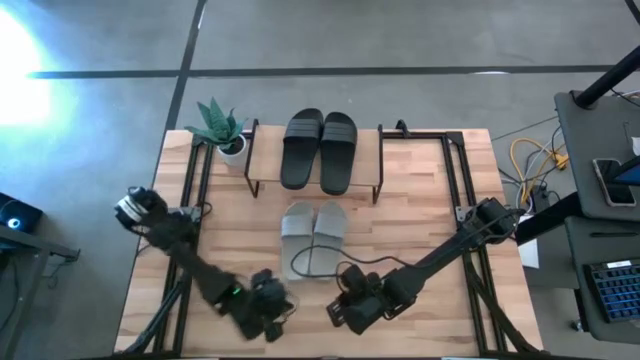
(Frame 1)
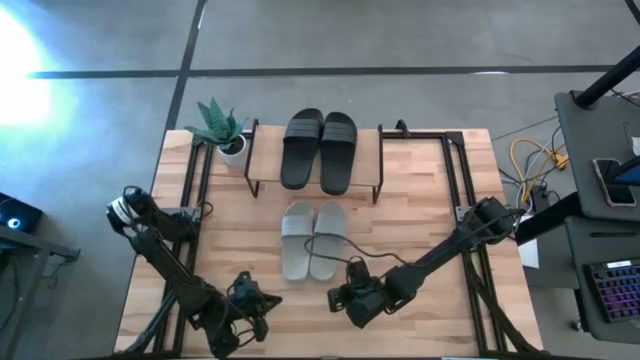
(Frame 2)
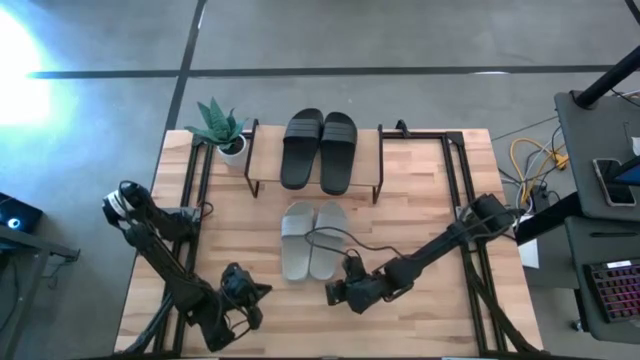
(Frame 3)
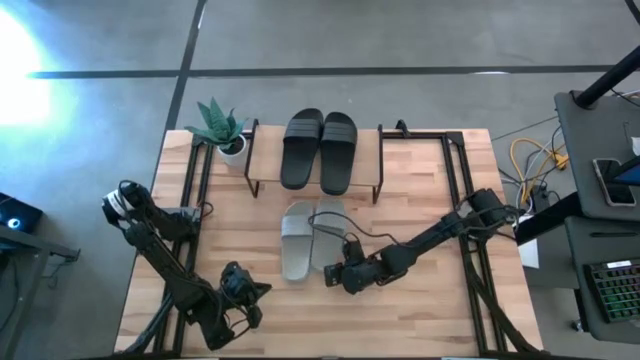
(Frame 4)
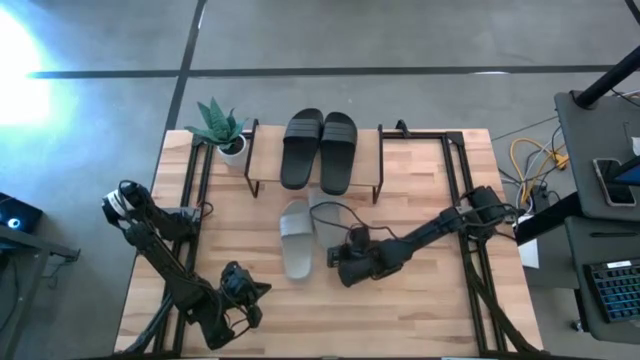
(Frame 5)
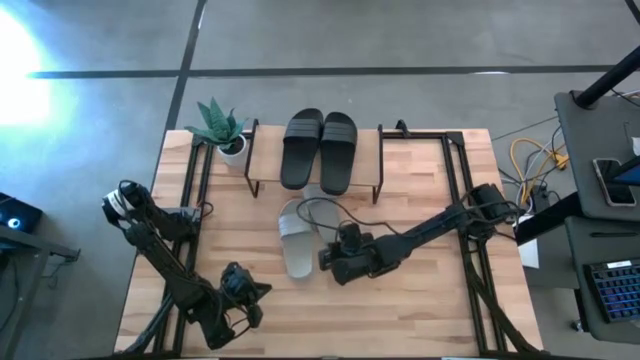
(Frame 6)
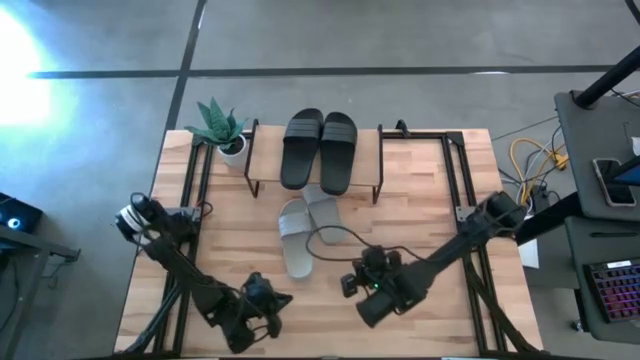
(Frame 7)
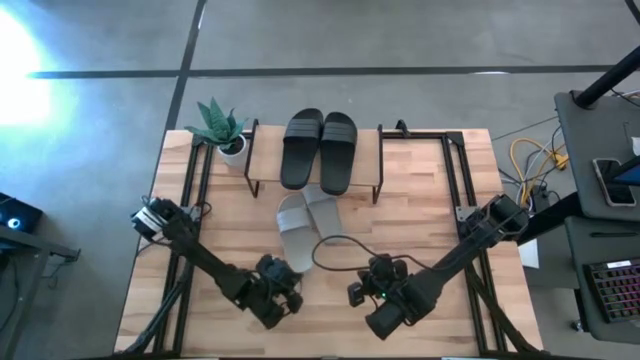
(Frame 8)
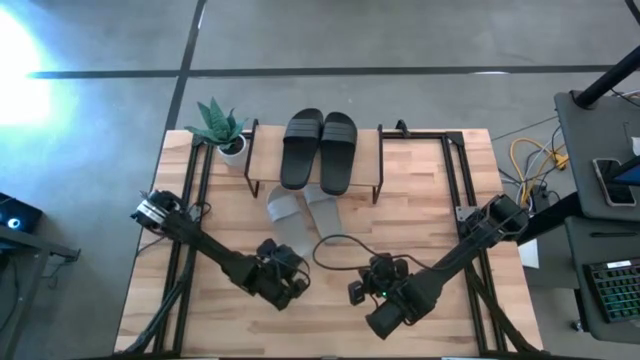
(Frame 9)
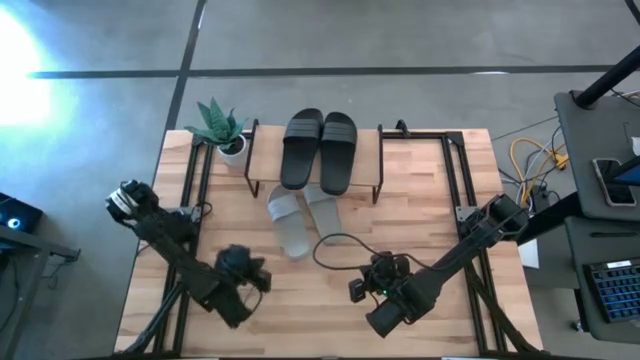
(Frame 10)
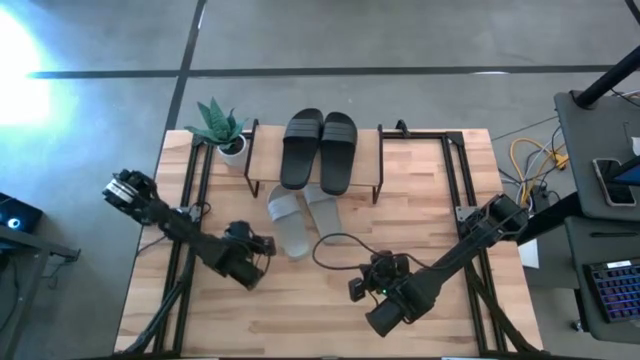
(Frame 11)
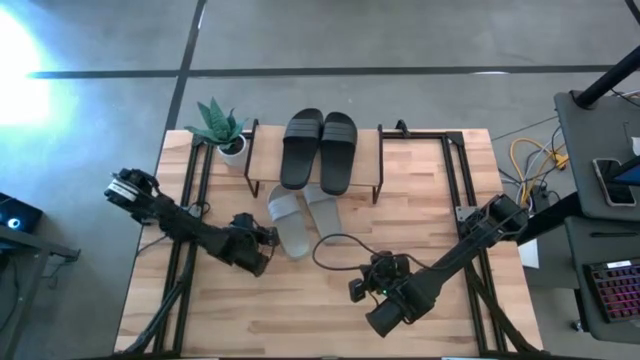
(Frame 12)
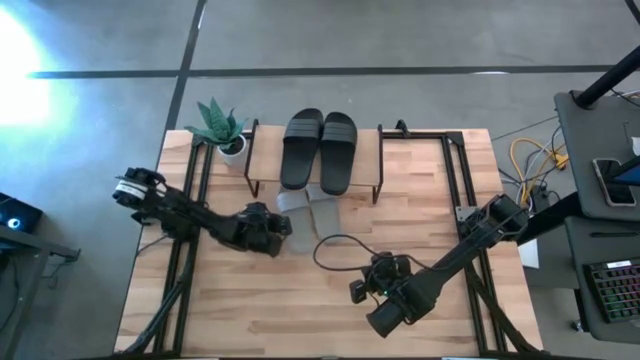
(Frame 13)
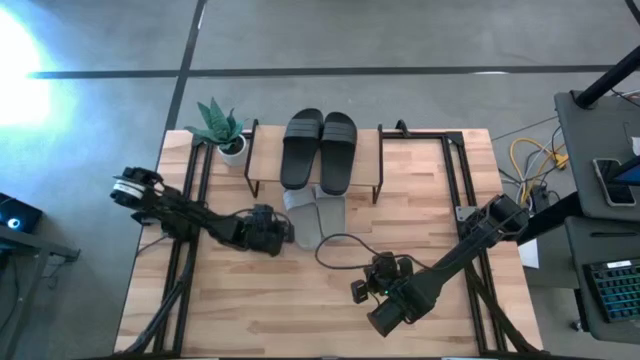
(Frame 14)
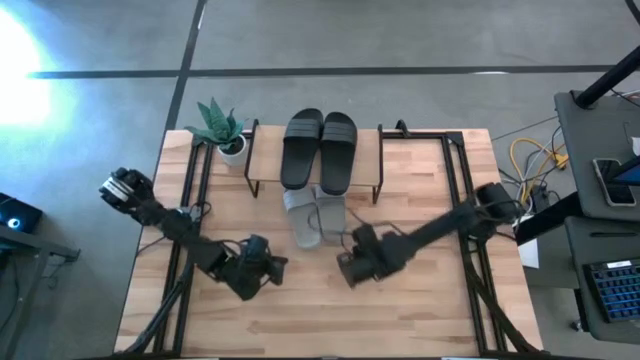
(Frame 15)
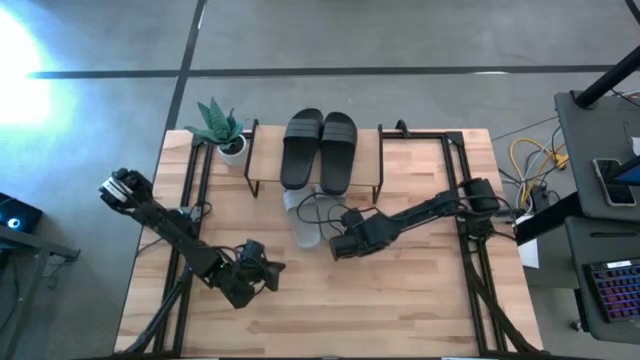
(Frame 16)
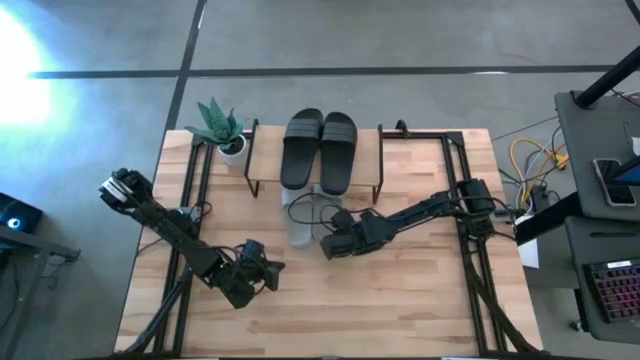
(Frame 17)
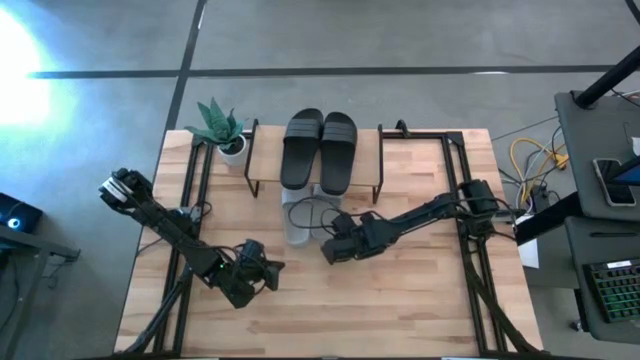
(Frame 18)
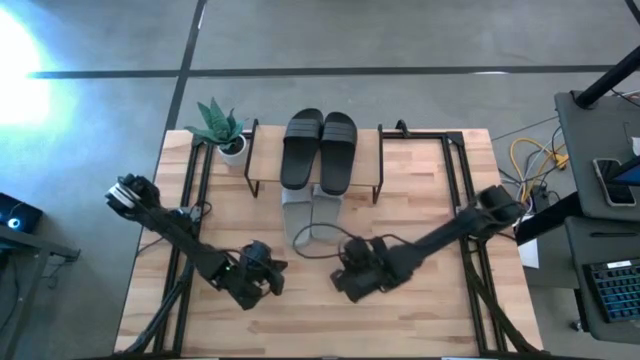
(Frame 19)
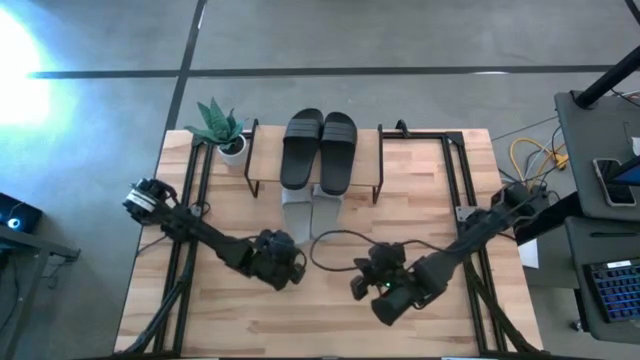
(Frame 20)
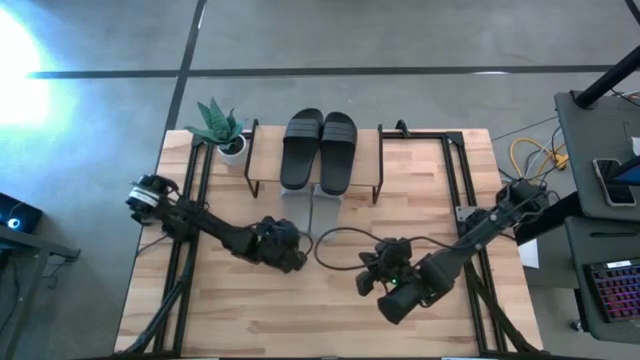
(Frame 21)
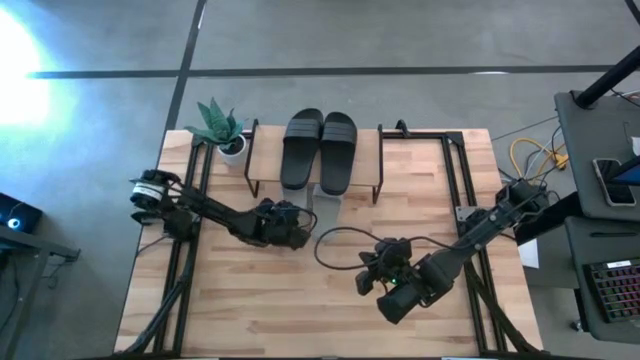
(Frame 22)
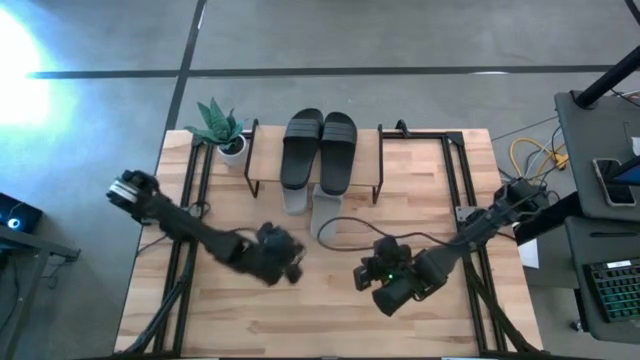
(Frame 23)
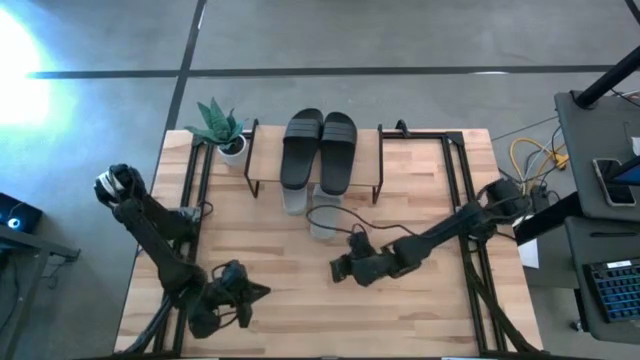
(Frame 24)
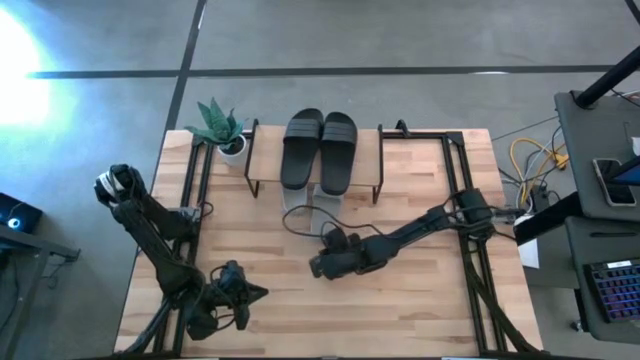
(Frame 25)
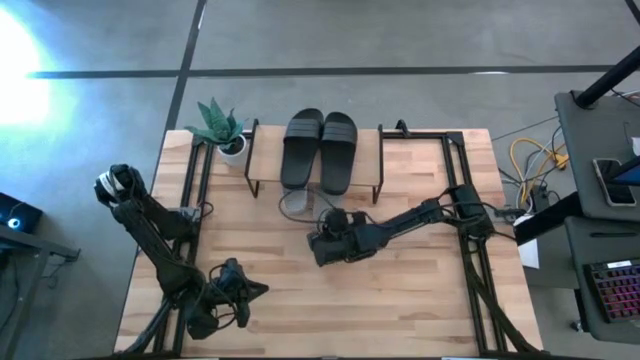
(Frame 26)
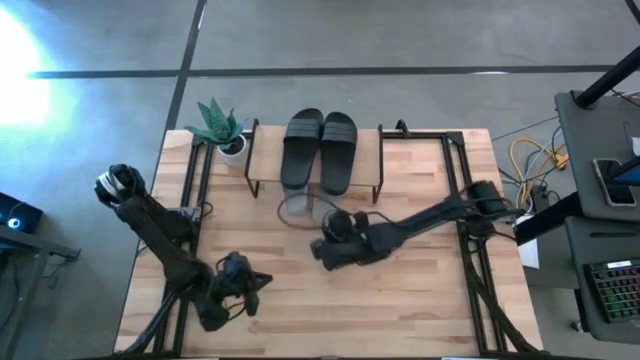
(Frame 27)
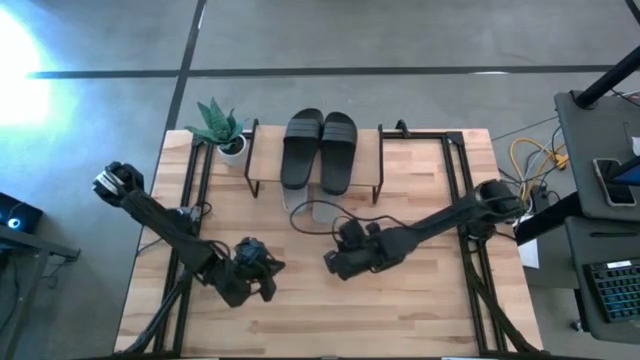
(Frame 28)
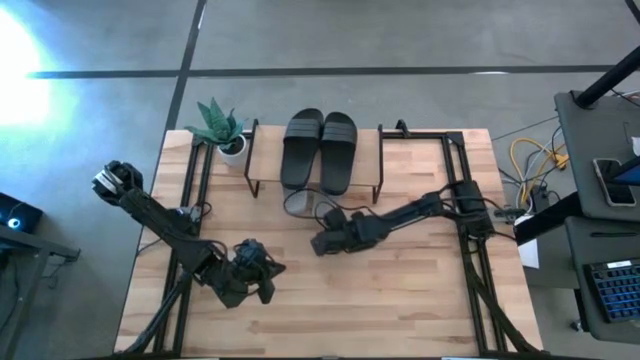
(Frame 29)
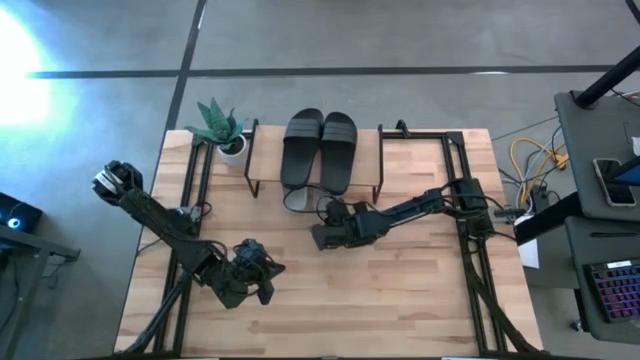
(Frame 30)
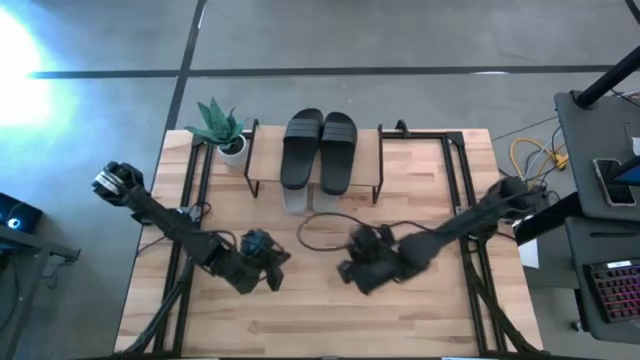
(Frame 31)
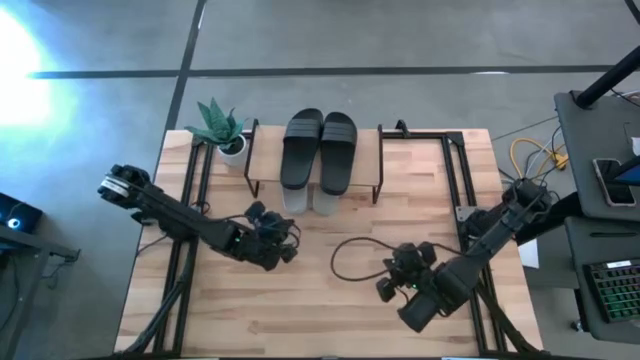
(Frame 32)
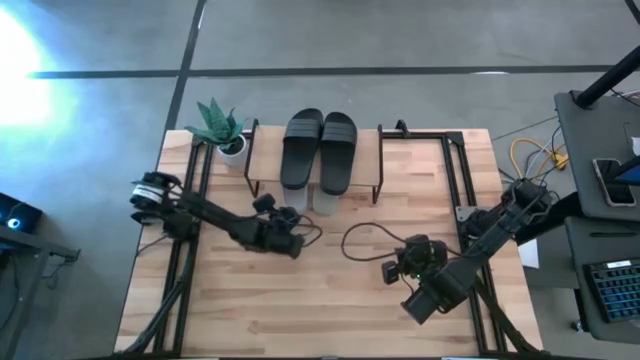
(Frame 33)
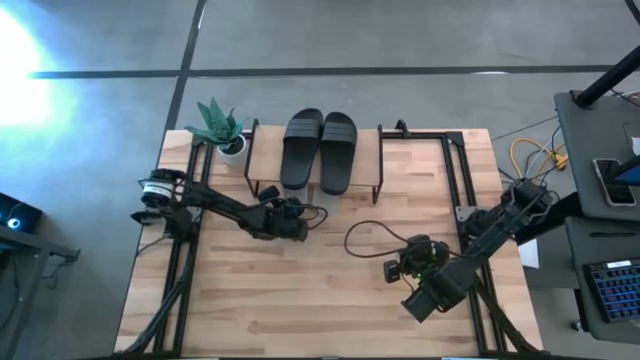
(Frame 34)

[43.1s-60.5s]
Task: Pick and place slides into the shelf
Put the gray slippers under the shelf

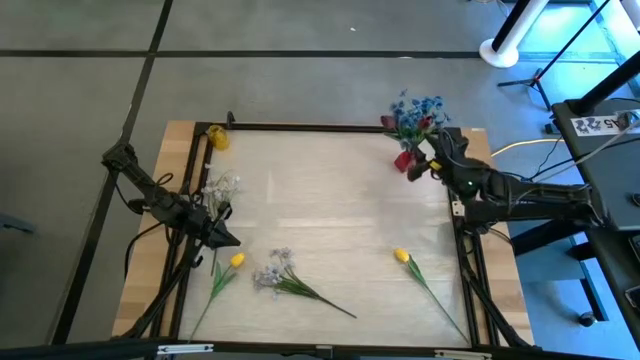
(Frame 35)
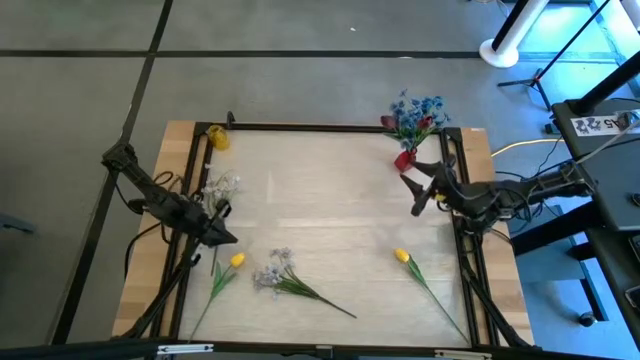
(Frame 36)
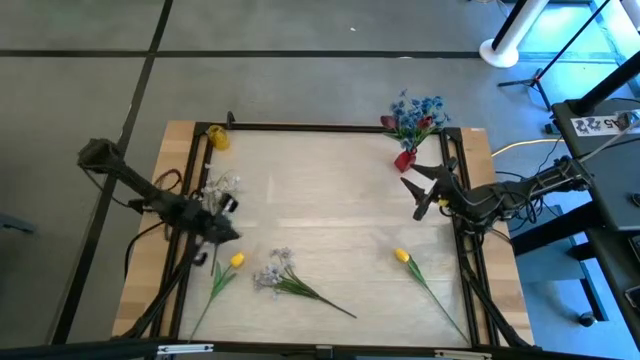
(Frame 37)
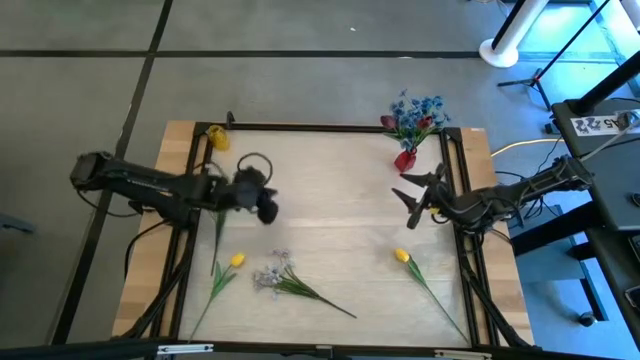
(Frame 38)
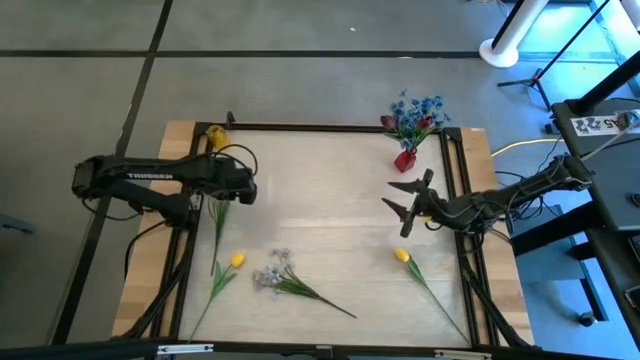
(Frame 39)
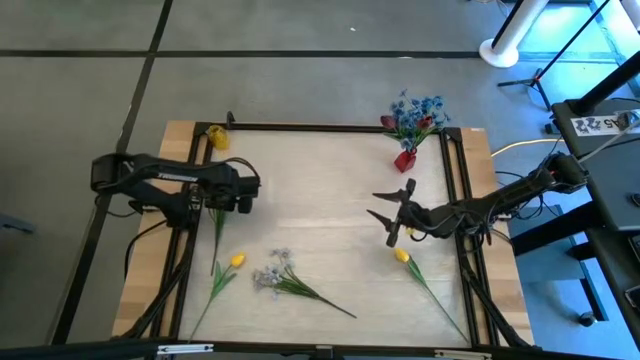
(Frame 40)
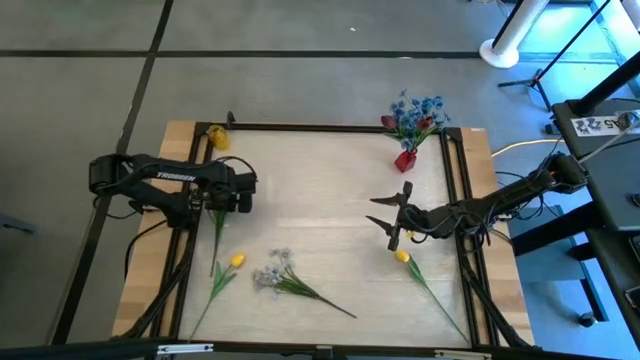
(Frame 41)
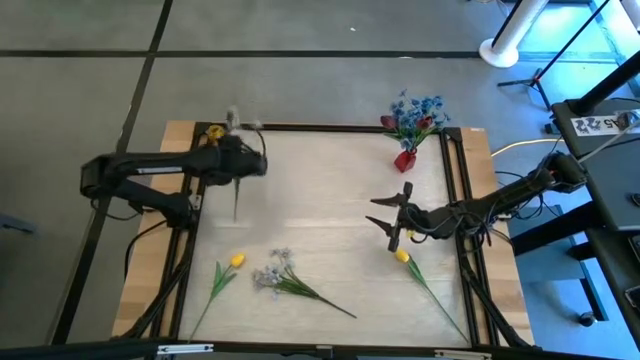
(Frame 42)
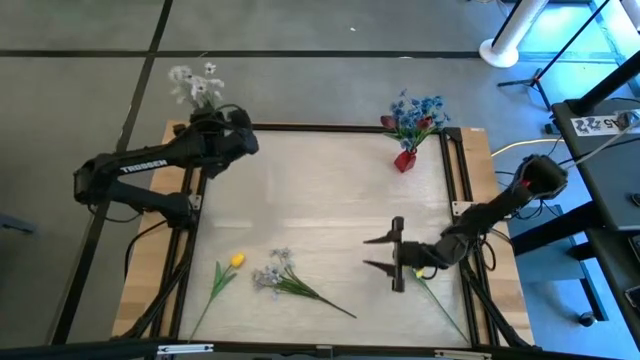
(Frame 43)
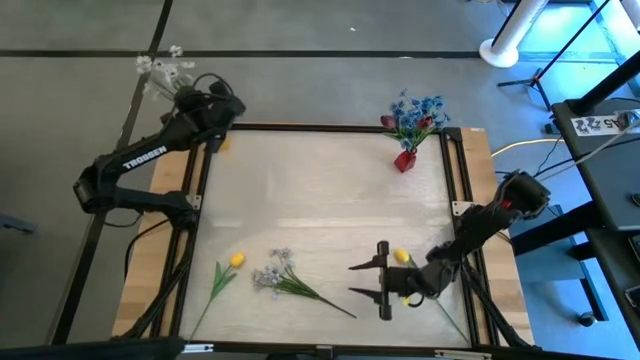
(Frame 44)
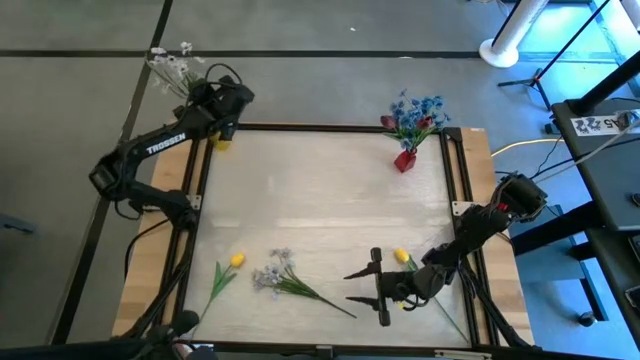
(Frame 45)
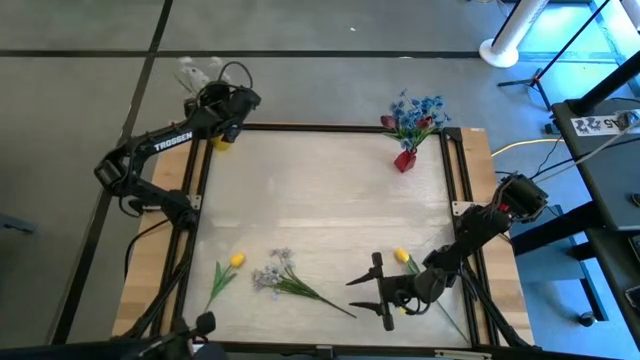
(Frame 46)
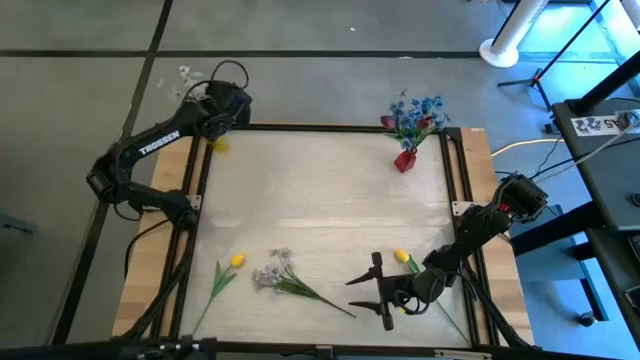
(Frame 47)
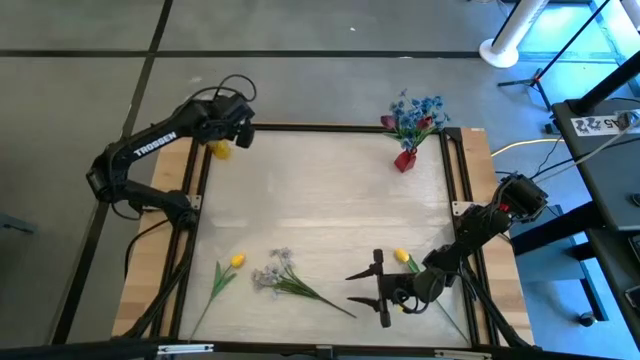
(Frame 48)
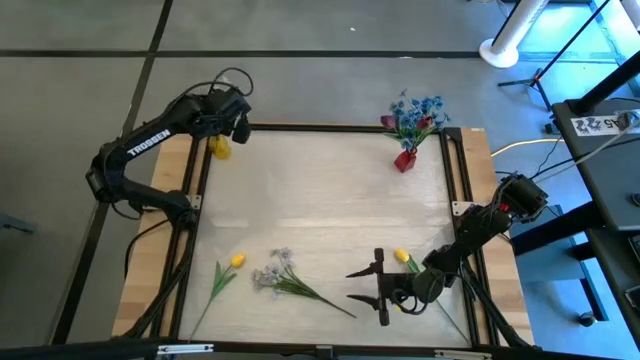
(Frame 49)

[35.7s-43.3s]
Task: Sort flowers into vase by color
Put the top white flower into the yellow vase
